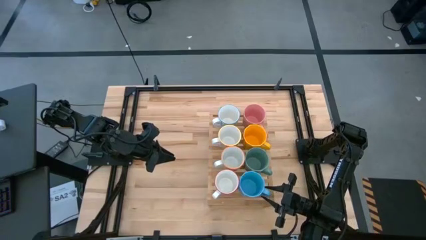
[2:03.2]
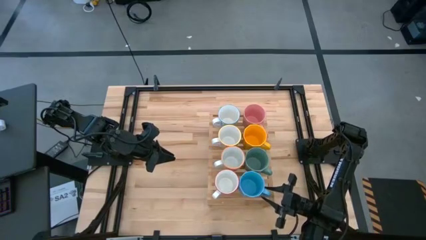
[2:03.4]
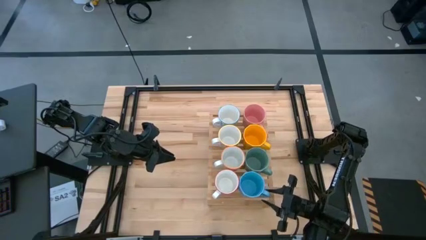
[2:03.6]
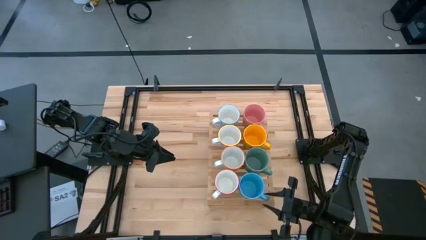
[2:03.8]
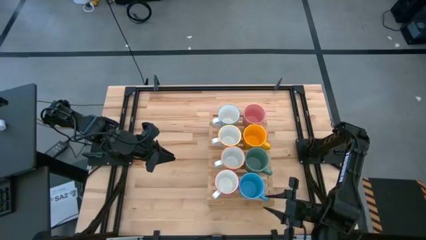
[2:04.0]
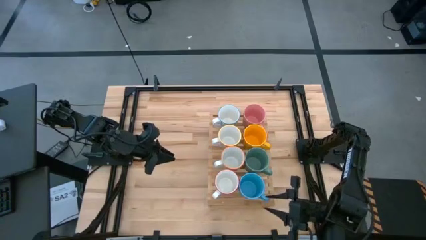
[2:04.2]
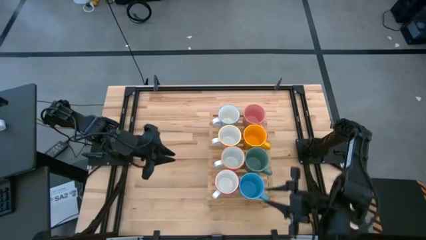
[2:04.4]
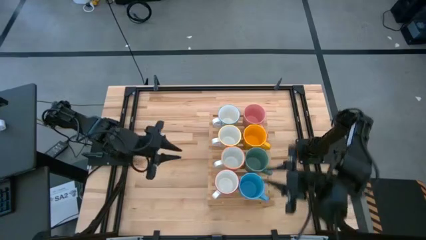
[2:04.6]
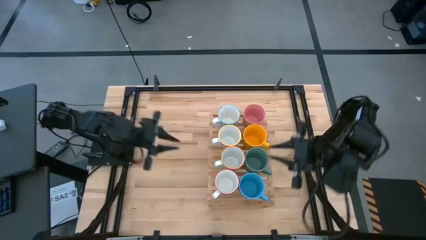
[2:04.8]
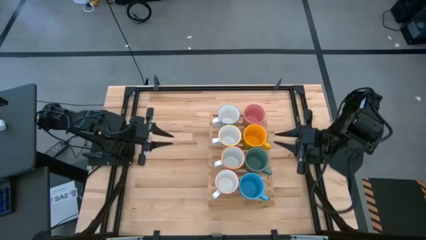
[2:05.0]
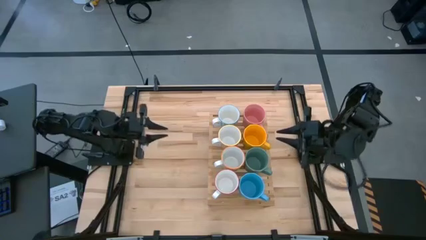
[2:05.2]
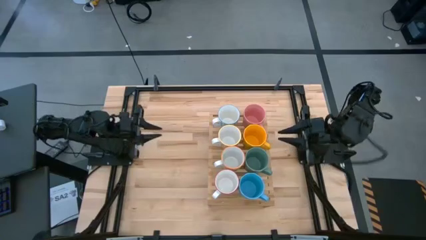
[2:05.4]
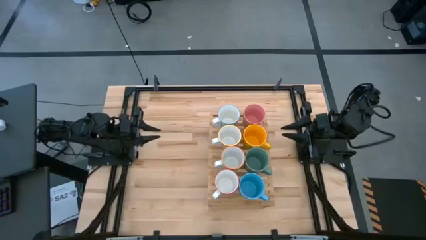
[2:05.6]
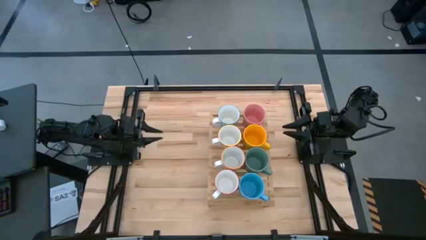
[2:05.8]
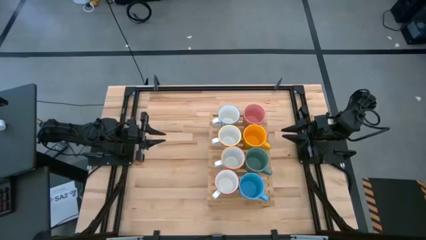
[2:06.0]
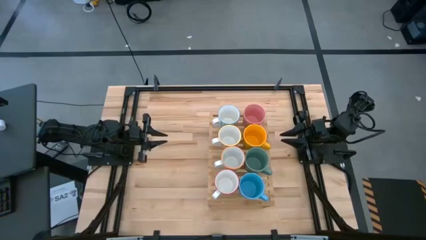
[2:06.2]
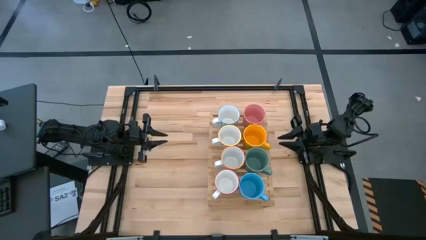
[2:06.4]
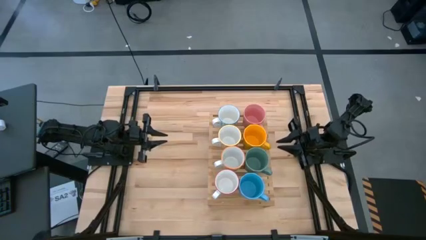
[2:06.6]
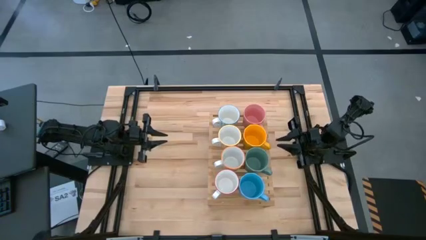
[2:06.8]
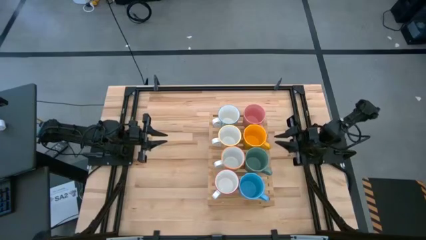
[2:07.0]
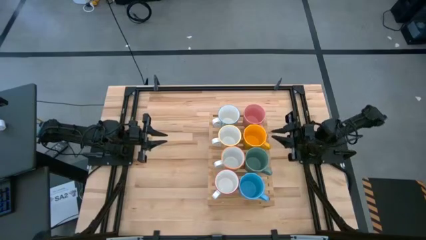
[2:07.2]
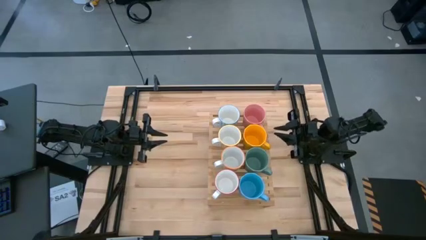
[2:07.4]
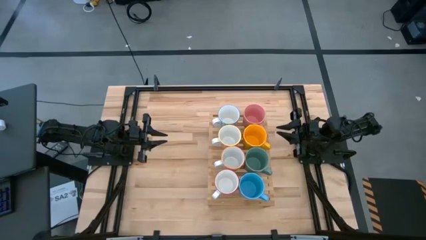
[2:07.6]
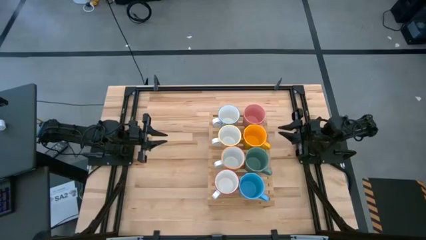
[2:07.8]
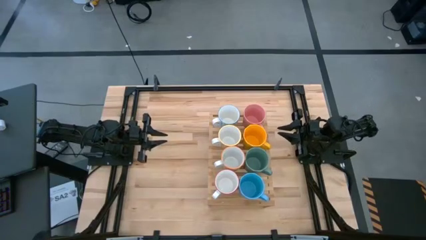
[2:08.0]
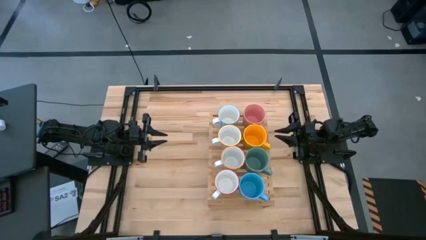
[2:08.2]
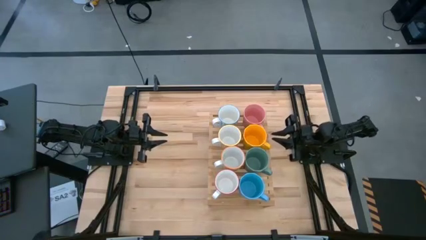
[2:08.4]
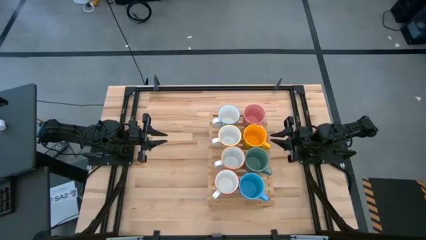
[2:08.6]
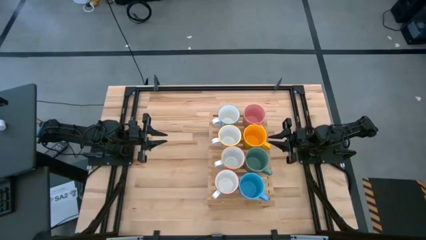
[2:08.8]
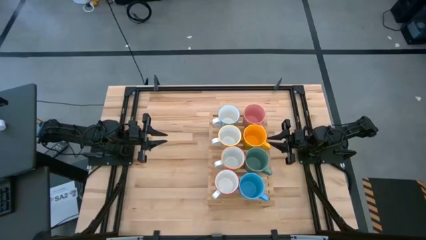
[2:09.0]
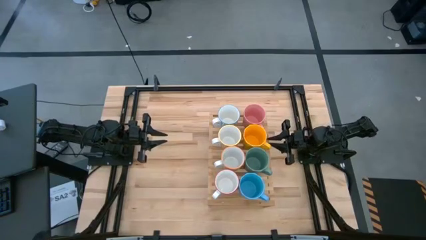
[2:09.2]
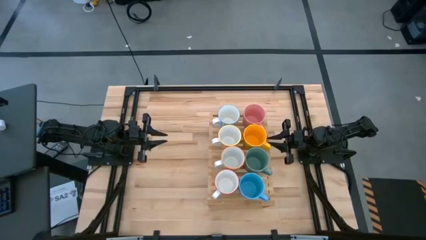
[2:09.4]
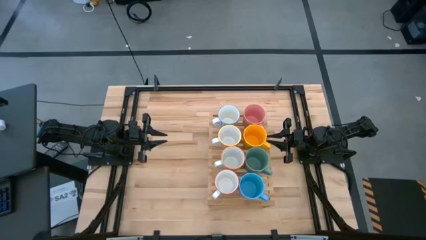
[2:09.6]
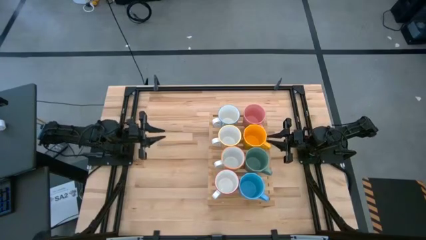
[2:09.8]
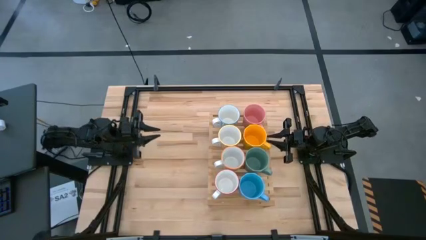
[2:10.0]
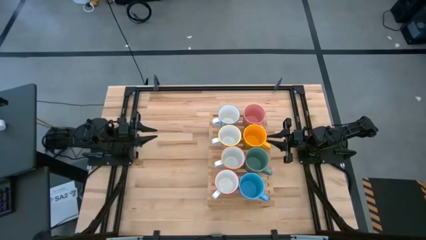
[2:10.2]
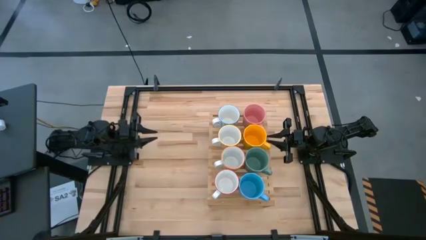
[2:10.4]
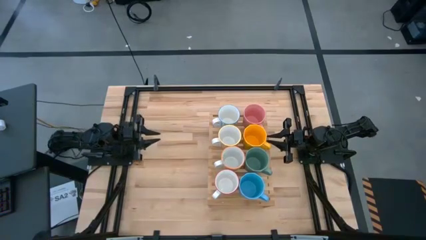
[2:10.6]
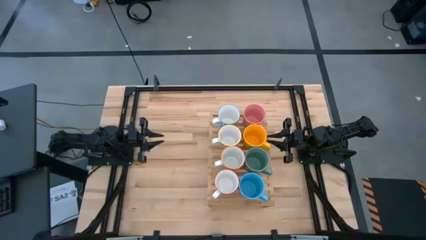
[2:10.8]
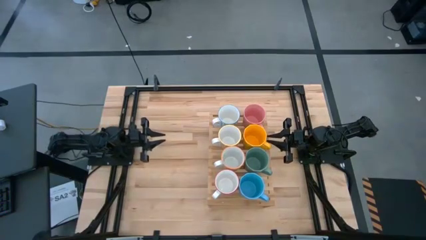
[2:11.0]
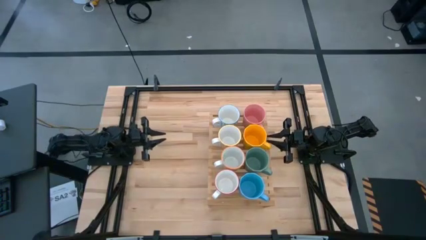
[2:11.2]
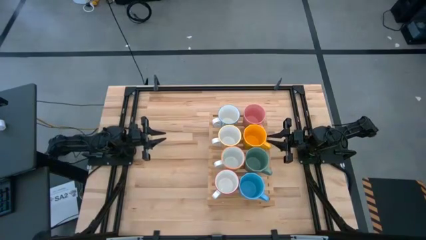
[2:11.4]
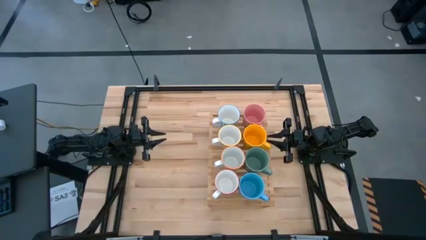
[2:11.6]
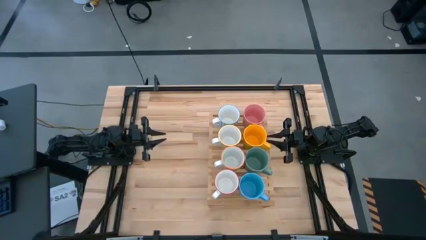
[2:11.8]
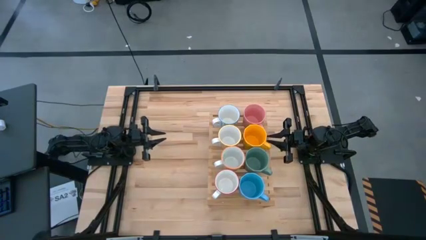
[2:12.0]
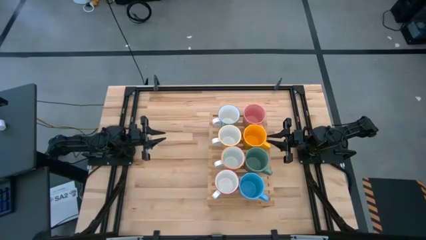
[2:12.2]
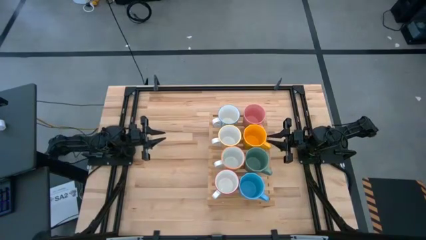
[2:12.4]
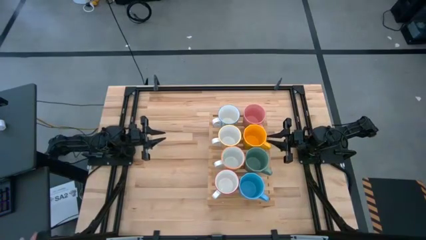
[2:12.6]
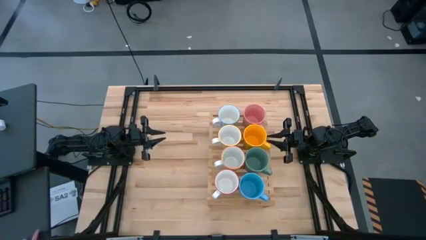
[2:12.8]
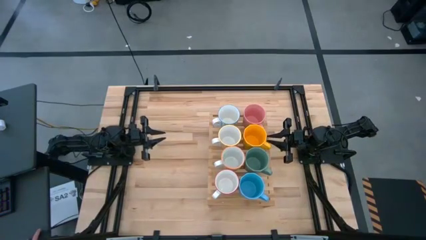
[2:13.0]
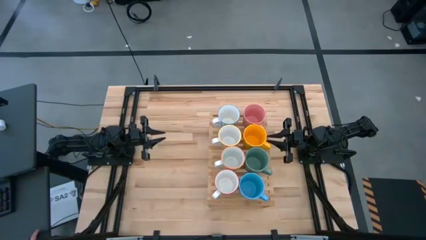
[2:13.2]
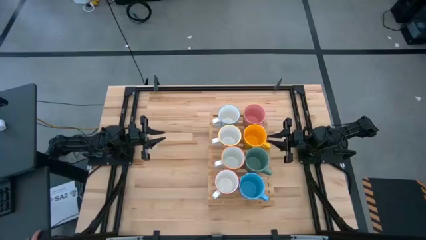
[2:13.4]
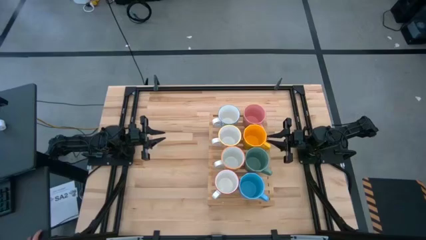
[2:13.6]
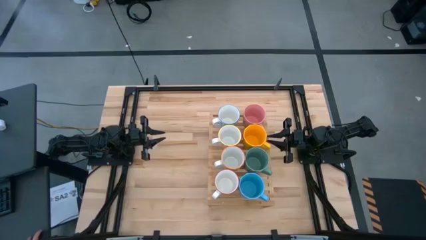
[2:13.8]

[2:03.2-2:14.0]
Task: Place coffee mugs
Return to Home Position
